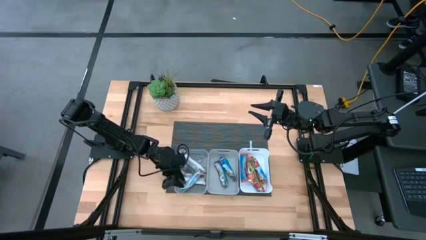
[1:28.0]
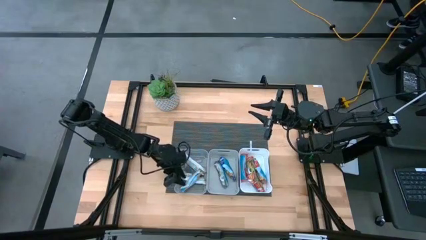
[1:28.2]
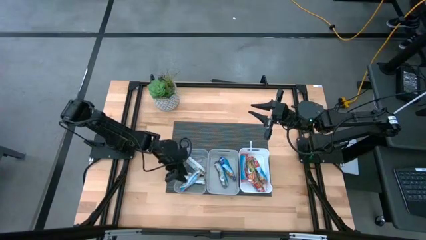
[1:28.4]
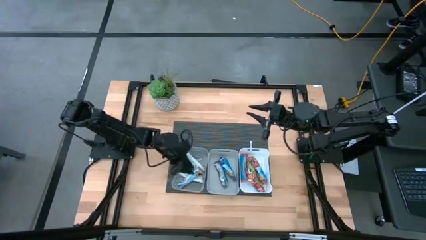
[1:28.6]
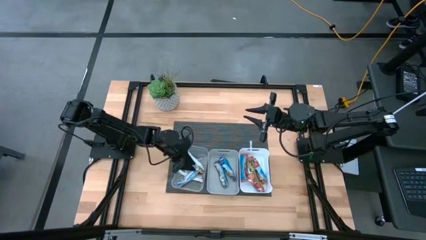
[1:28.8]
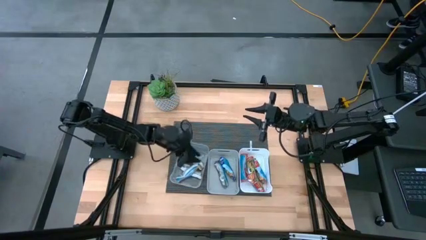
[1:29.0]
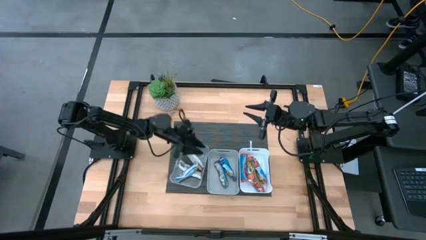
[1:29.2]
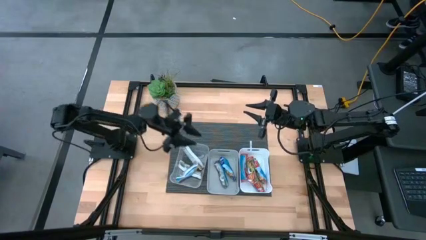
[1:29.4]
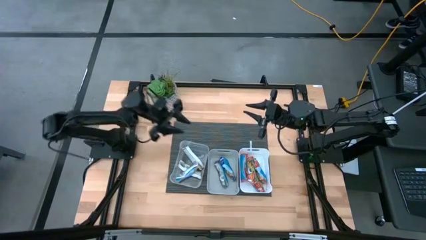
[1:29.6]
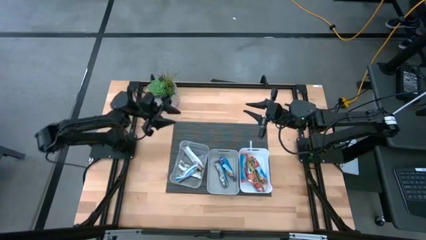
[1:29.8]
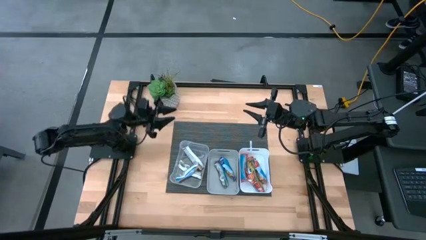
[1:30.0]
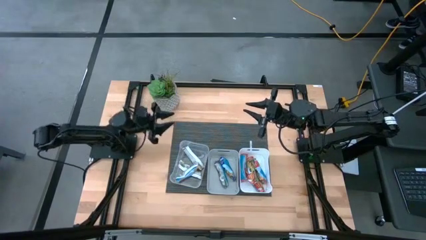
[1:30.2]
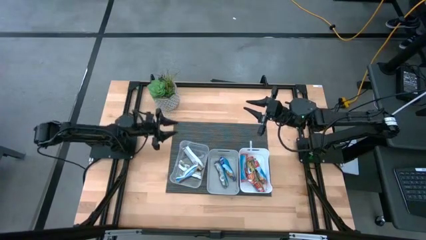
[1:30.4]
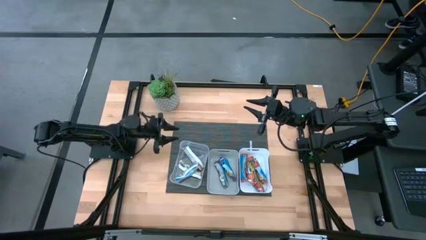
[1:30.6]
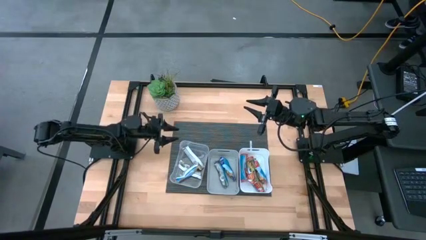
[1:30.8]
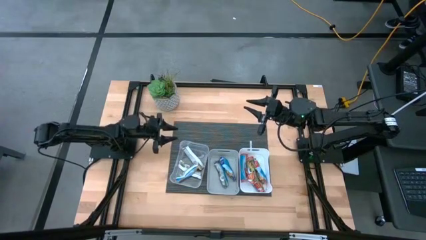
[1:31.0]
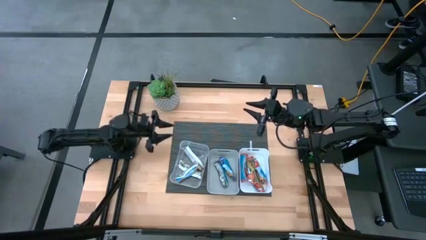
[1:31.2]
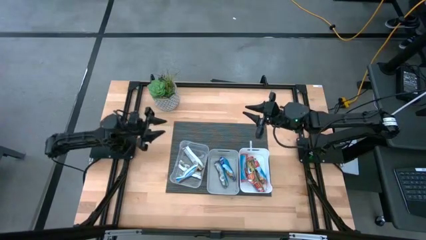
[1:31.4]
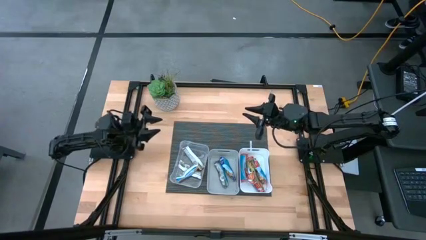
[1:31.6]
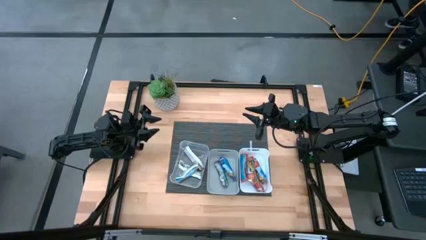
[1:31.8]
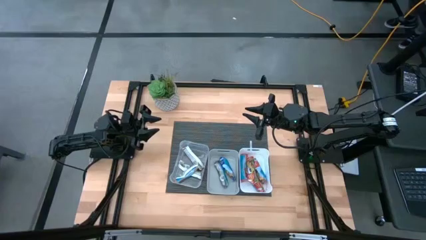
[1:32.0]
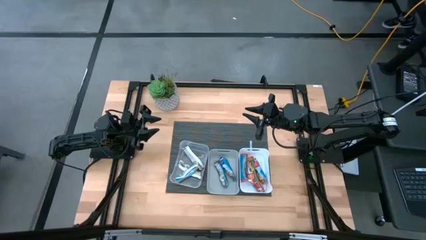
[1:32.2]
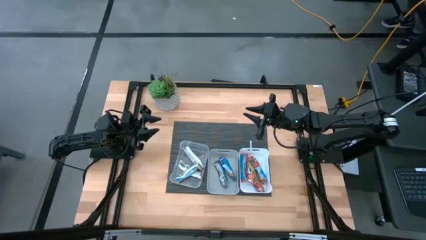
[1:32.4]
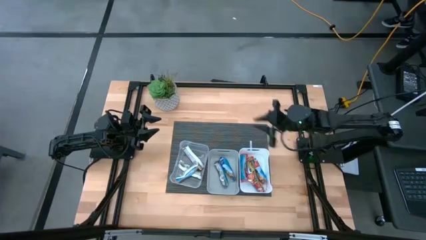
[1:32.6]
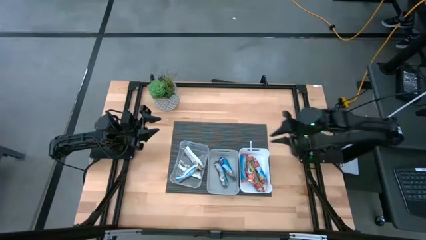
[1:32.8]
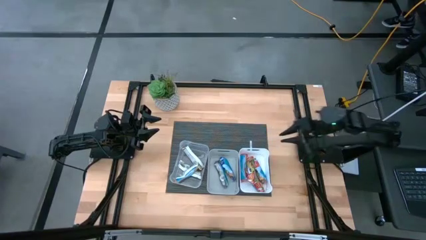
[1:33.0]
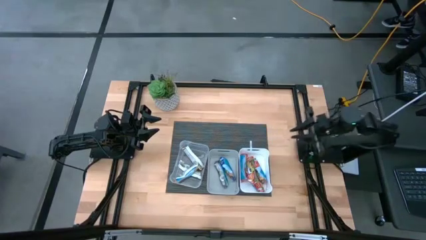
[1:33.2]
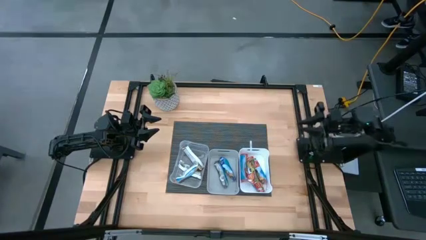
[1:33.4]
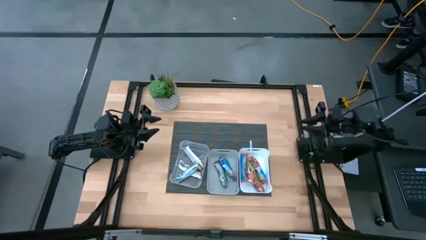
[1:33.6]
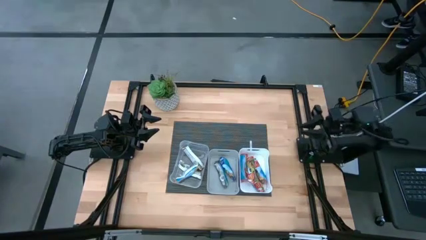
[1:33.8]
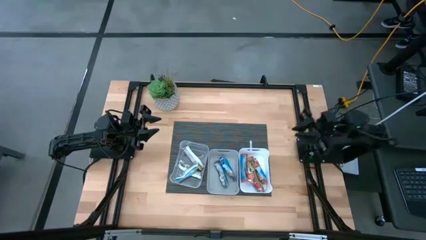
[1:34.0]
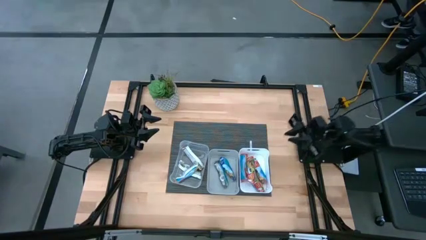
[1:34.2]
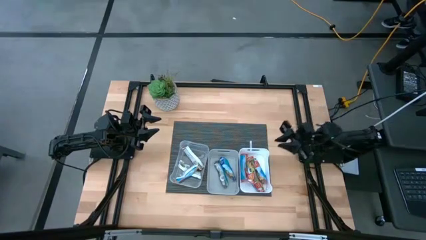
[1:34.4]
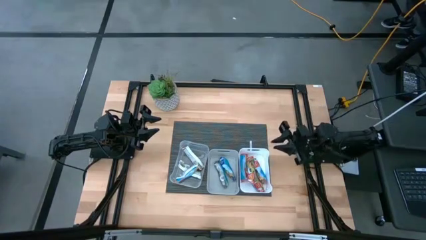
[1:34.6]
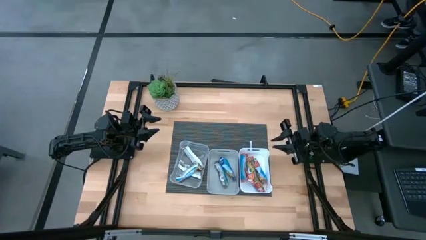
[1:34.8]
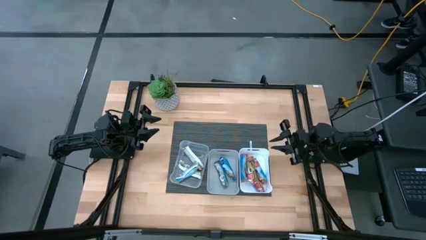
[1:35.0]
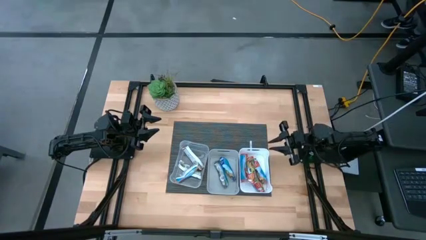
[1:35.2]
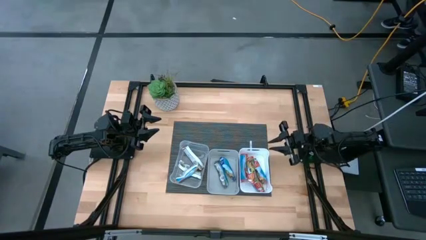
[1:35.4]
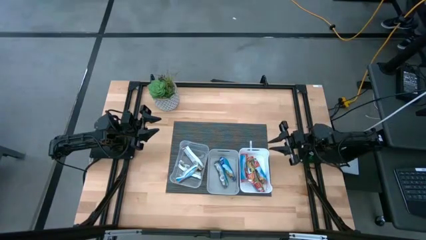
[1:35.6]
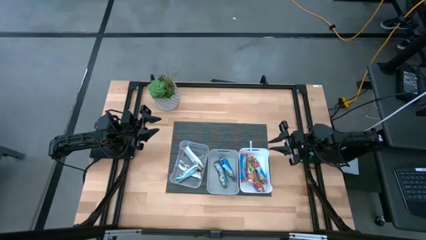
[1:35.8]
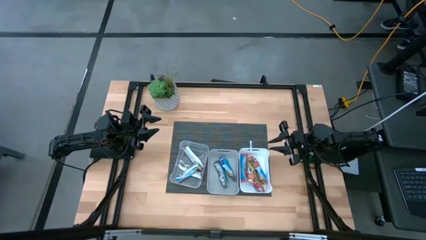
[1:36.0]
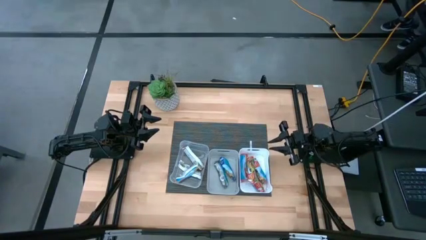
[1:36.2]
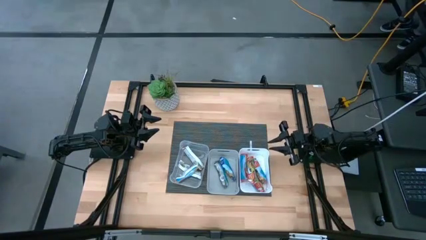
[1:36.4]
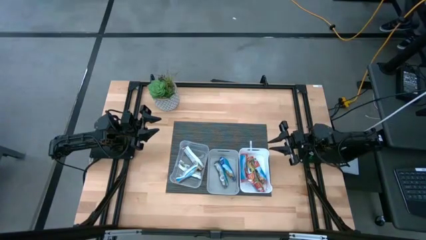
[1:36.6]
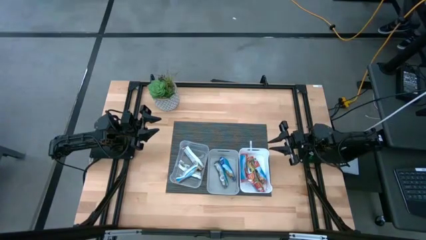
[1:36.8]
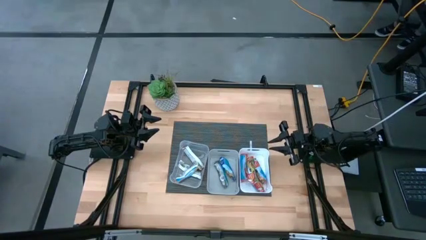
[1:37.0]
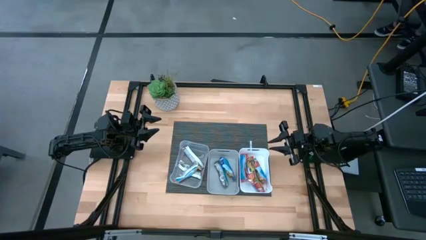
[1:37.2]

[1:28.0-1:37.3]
Task: Pick and place Granola Bars by type
Return to Home Position

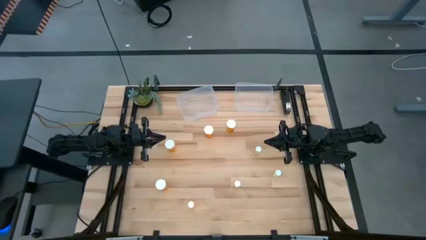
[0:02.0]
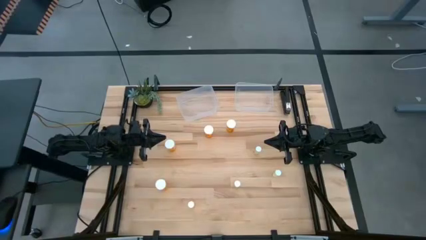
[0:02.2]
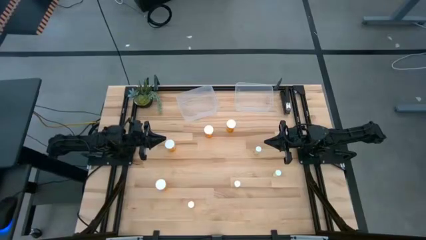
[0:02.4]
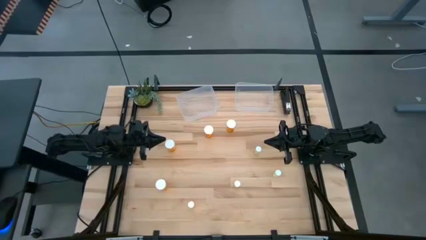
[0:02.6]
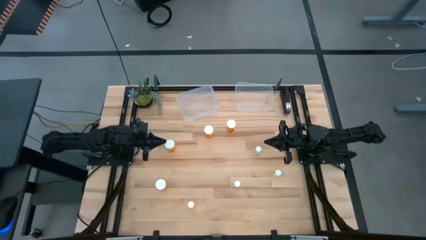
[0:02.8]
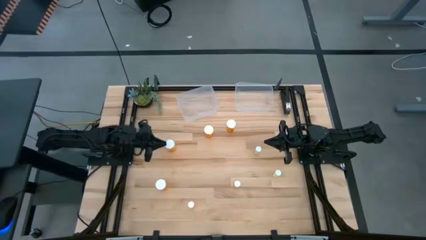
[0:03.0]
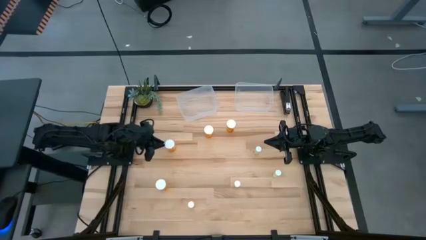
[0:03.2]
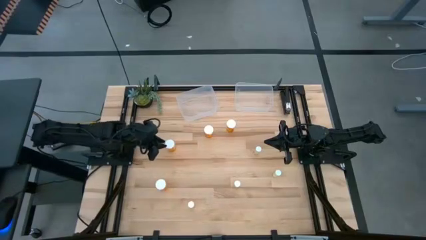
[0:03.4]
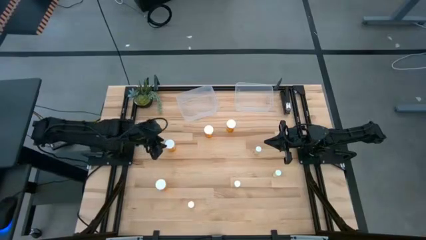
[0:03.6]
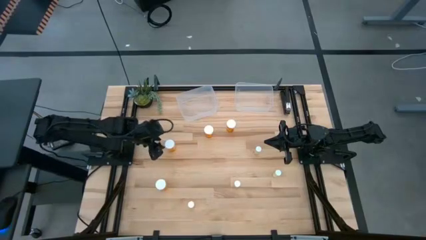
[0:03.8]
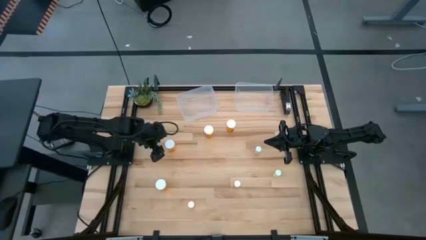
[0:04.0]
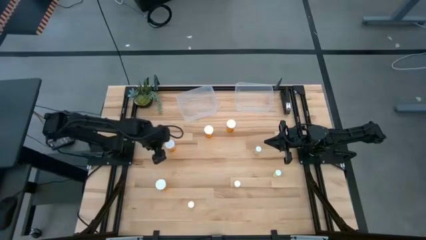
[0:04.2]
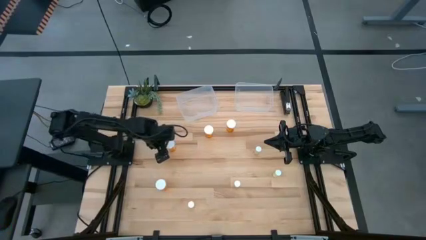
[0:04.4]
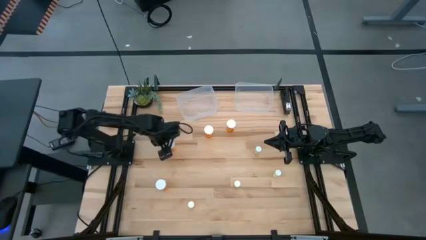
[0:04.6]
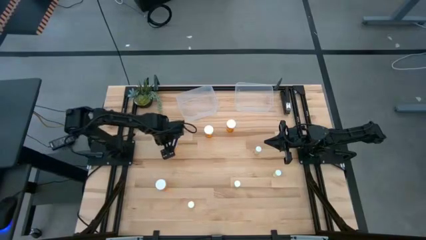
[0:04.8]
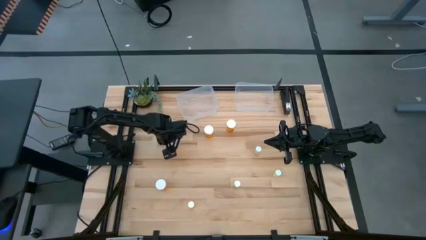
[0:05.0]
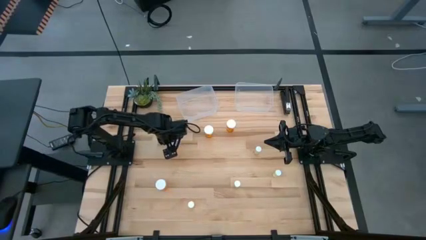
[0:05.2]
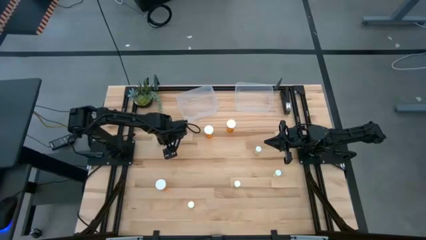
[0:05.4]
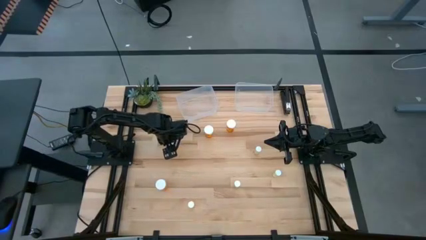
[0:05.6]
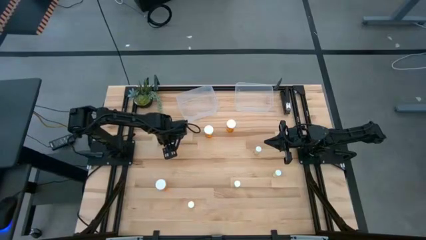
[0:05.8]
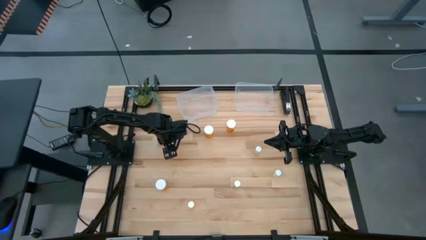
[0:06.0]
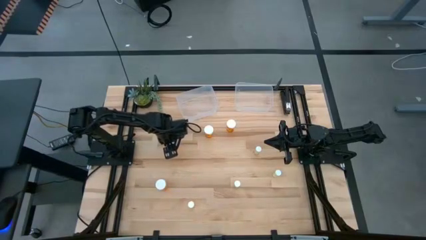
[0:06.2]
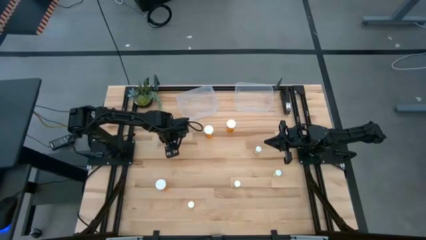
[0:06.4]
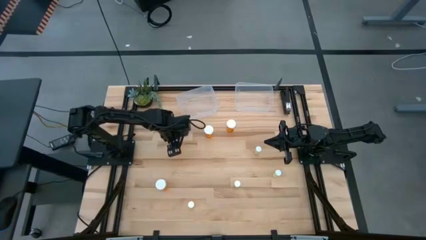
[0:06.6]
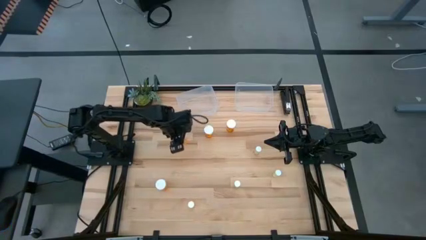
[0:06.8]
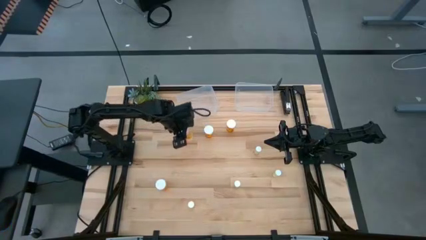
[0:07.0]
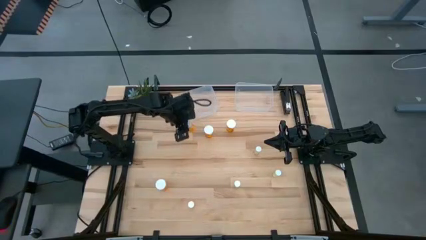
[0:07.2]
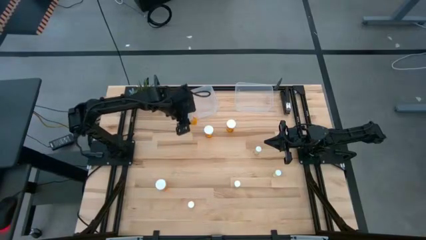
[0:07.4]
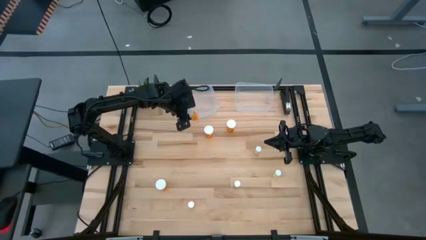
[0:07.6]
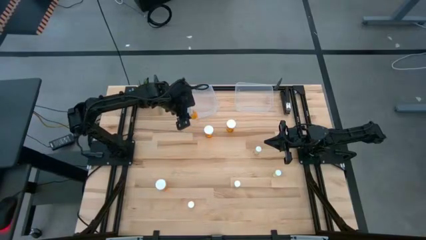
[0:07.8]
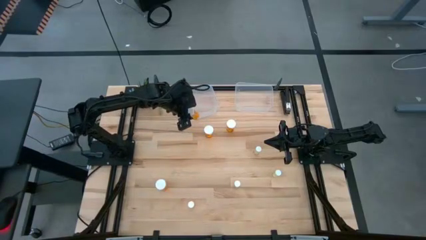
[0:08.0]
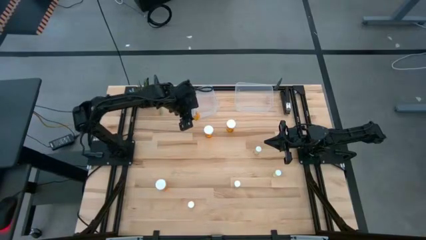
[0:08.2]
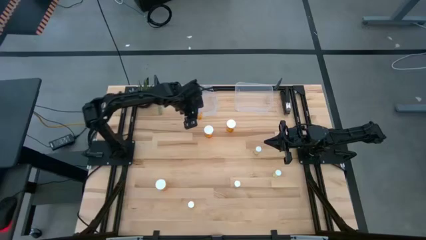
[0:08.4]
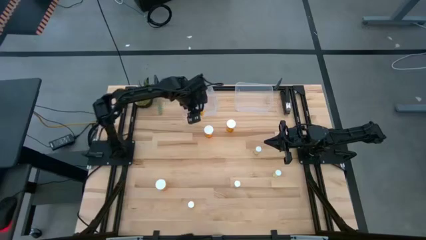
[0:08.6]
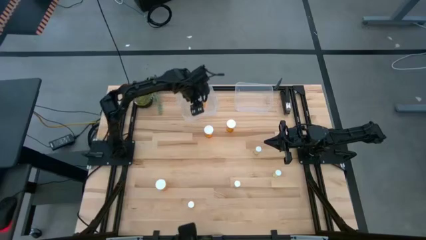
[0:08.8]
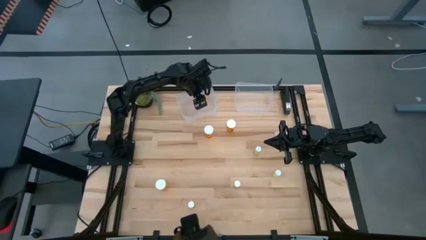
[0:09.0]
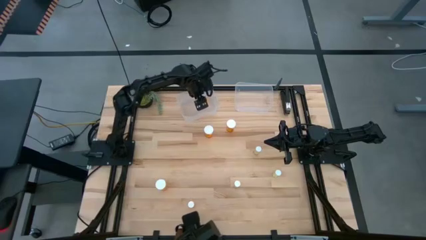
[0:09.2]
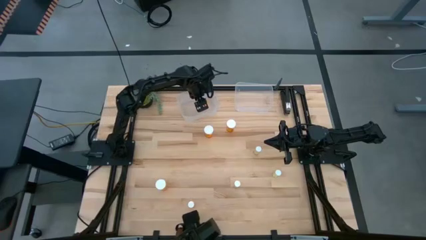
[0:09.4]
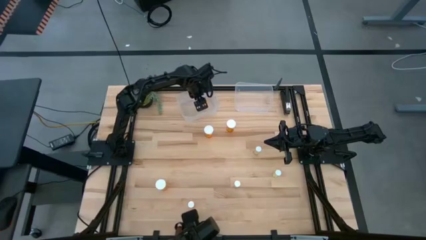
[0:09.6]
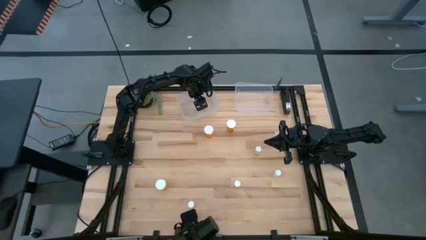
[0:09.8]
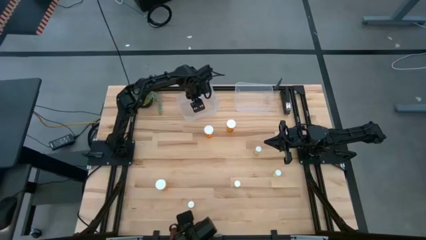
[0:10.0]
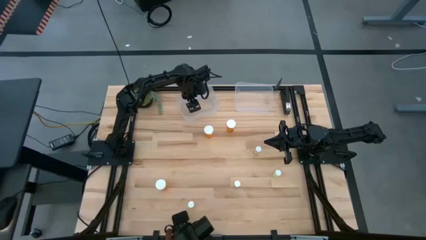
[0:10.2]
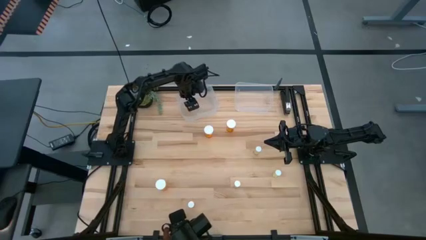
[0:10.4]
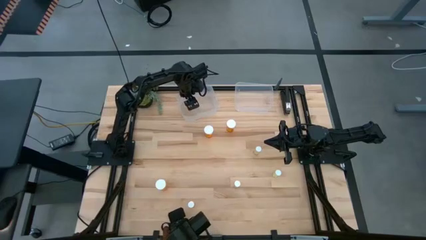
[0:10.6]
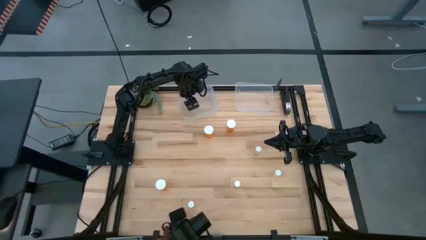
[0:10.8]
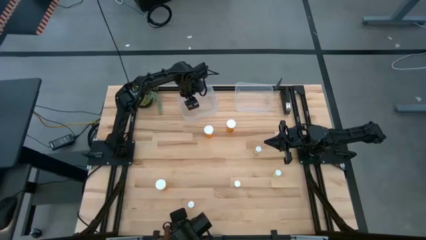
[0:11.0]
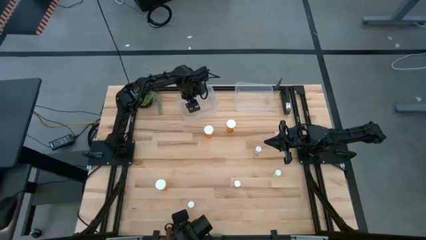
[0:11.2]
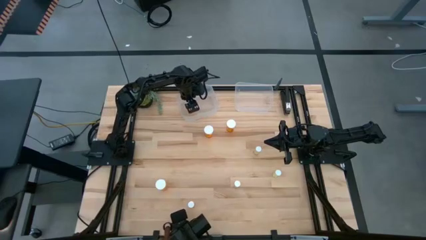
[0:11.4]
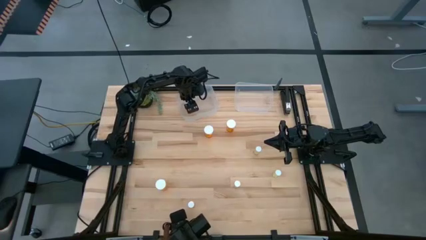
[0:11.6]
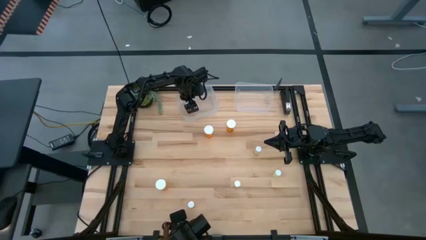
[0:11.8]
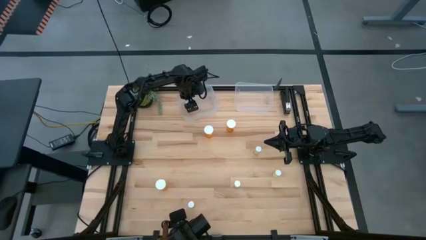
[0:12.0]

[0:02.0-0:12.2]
Task: Pick and place medicine bottles into bin by pill shape (circle, oval)
Put the orange capsule bottle into the left transparent bin
